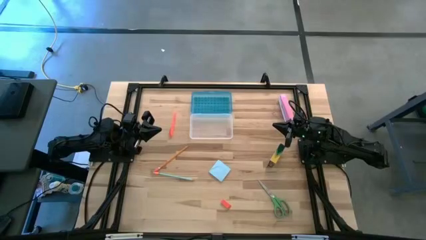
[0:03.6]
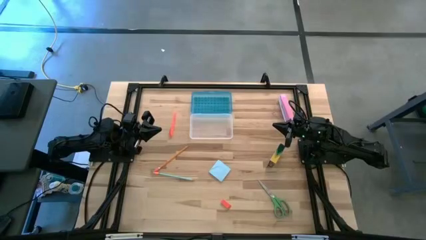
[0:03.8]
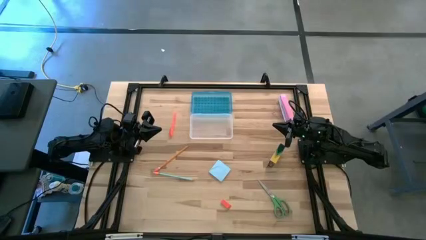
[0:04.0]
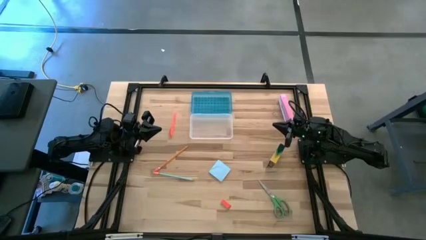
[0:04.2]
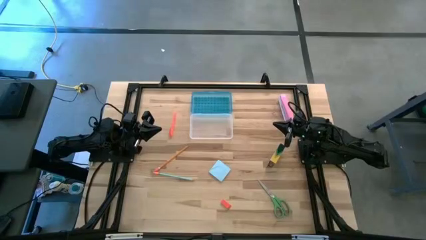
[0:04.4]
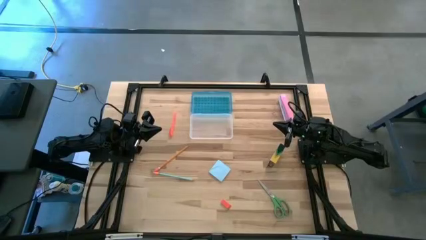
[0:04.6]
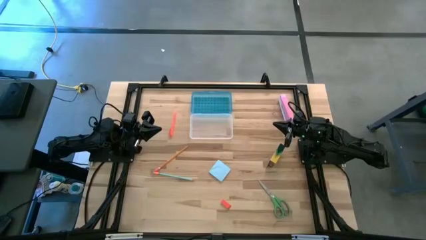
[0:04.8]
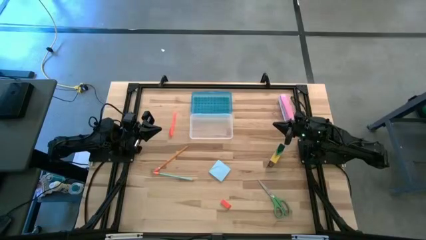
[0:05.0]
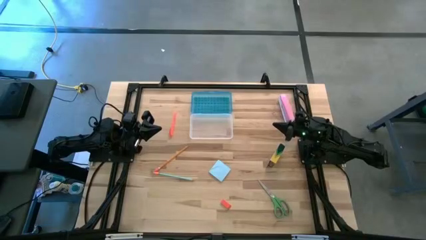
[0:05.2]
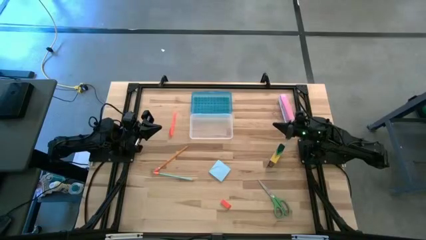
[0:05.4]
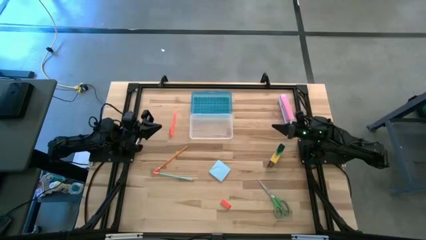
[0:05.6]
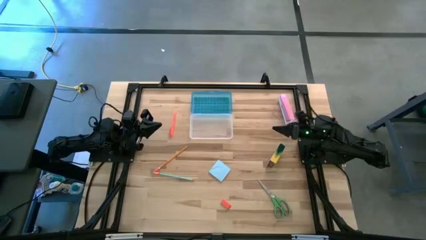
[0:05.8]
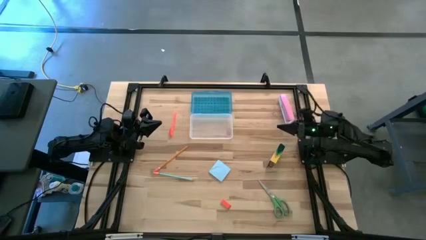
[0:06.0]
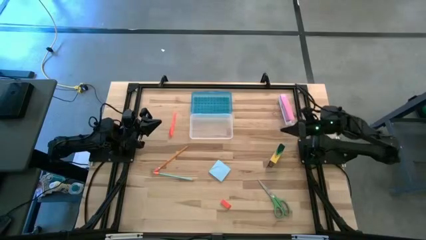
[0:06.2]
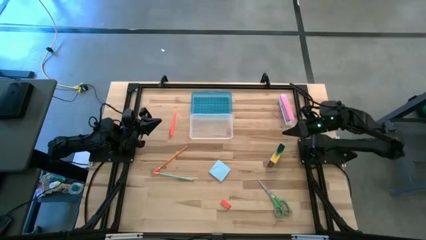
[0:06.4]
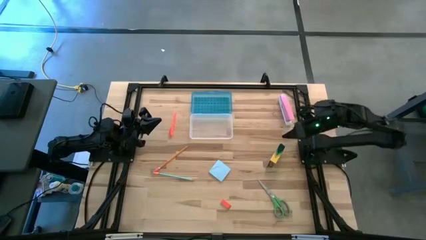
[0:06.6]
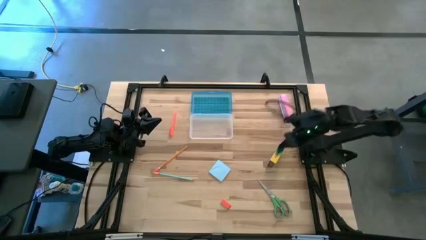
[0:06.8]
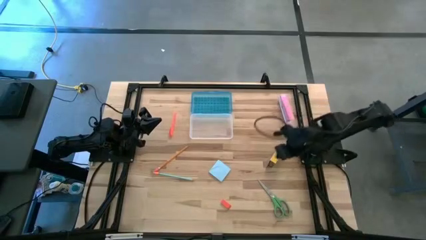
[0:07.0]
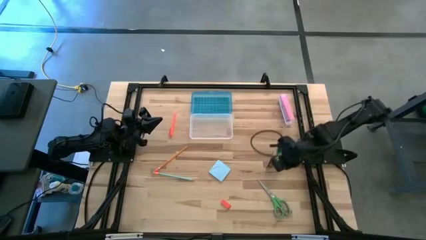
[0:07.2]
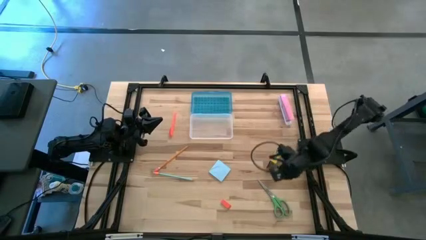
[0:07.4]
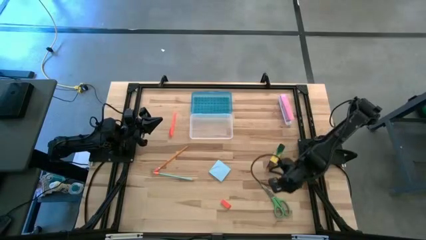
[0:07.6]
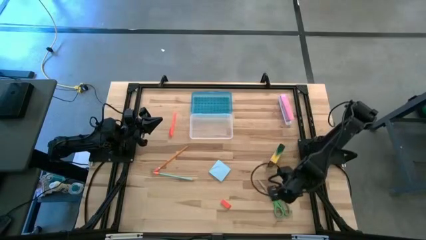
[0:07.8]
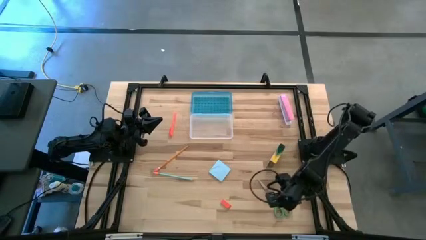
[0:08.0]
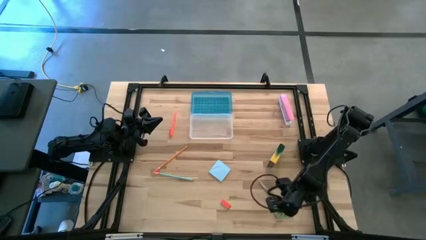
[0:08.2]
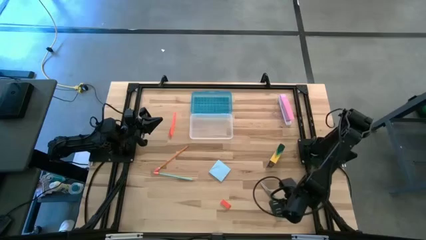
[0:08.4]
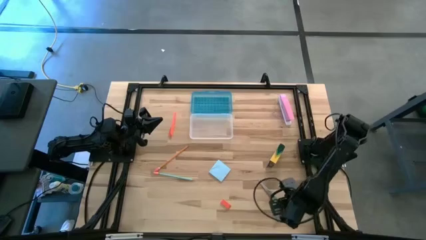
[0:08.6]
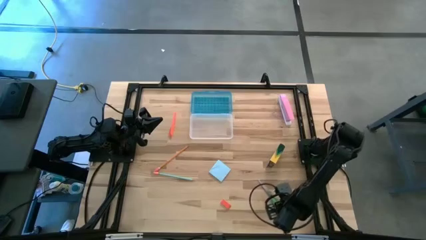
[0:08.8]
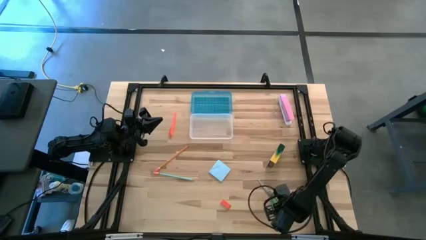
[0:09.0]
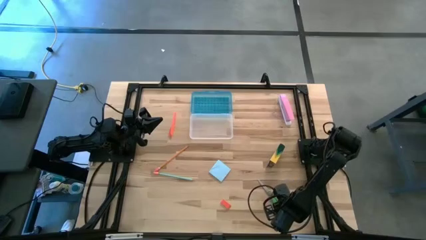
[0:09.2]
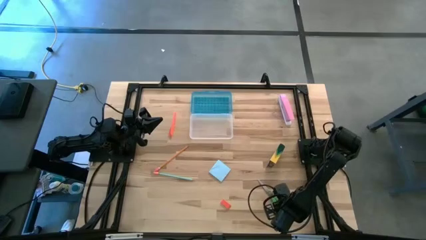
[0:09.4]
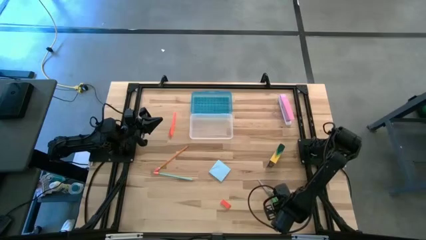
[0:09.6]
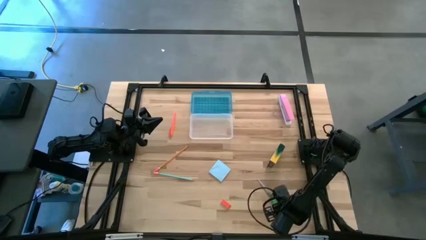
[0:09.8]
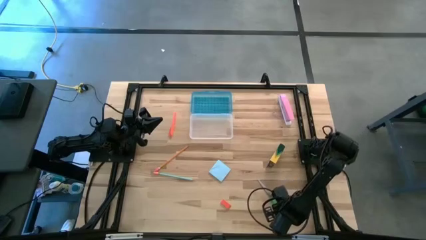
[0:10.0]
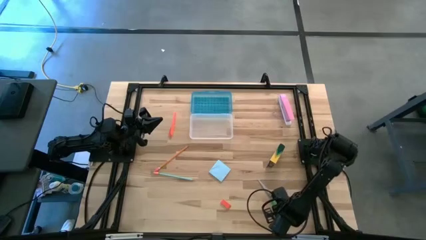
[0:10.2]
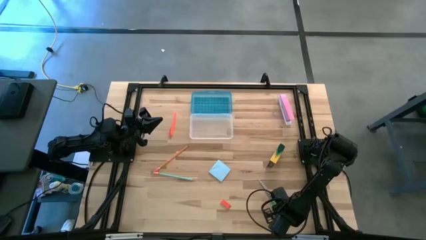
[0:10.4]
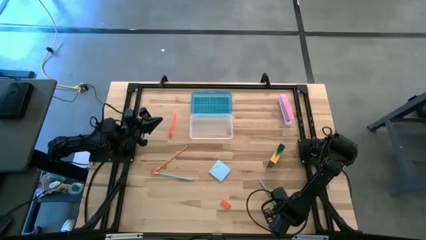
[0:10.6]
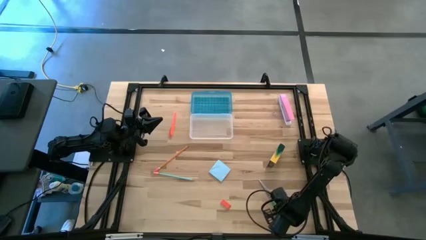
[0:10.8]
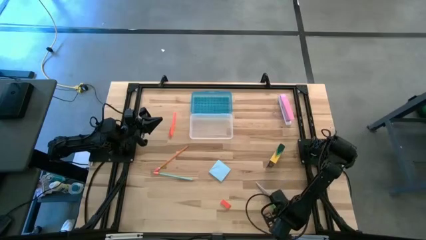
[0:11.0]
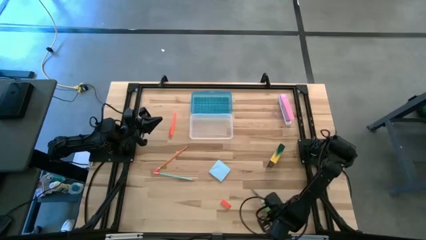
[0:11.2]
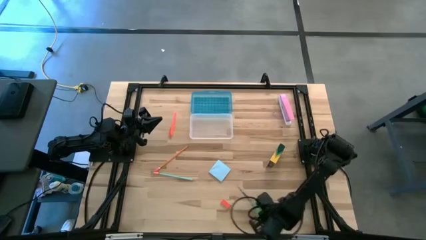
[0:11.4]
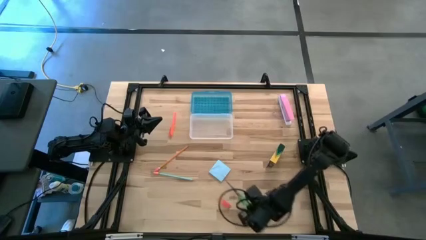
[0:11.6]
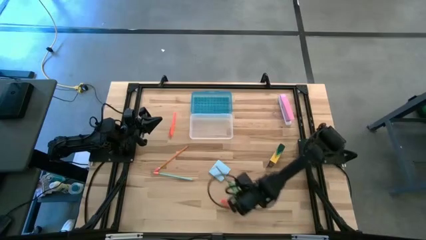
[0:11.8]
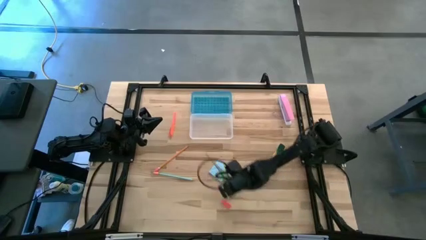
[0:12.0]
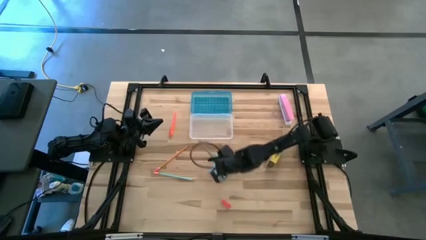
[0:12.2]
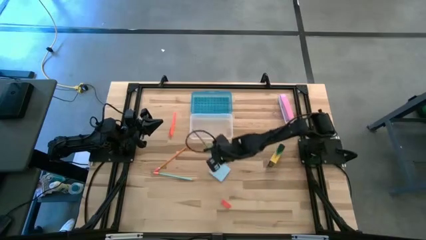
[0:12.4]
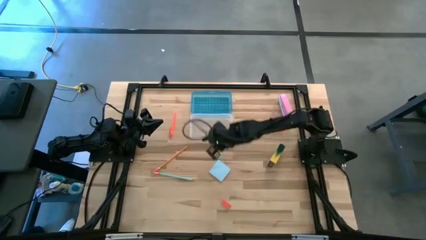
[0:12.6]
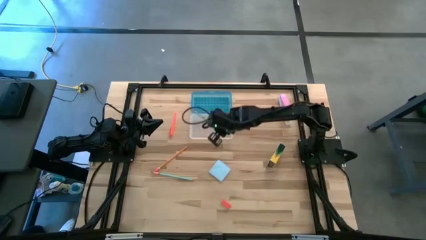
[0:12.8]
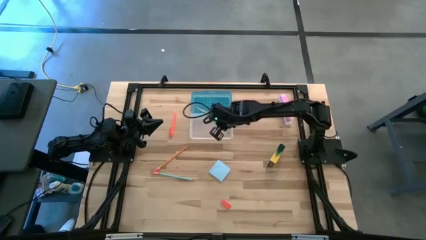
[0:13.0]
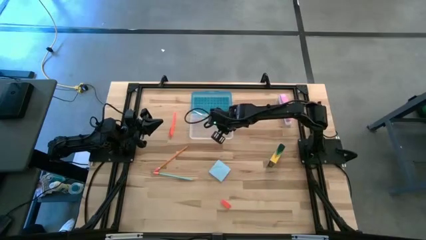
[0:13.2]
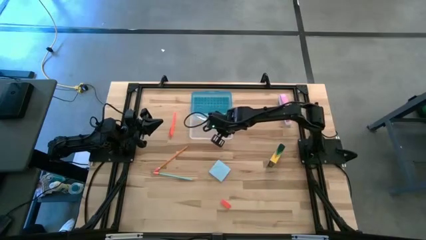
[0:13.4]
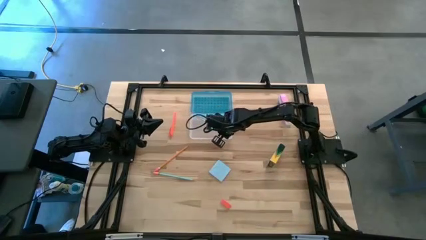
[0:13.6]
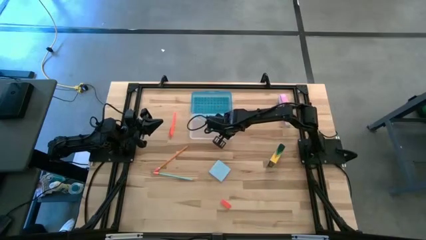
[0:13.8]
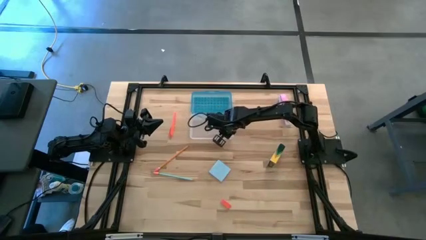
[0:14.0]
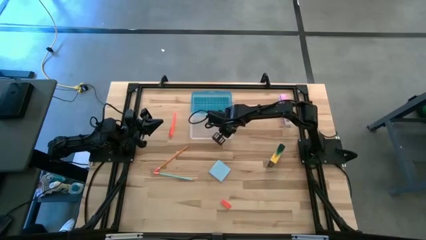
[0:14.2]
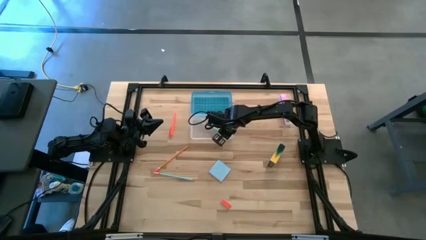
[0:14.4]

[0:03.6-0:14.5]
Task: Pack school essentials
Put the green scissor into the blue supply box

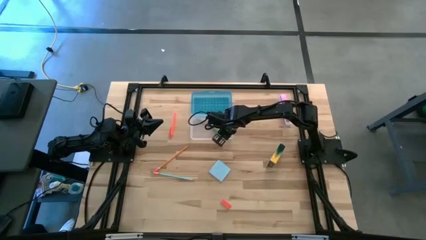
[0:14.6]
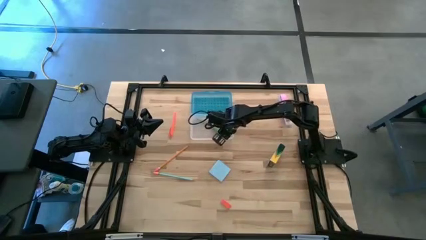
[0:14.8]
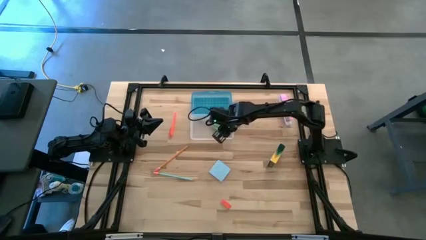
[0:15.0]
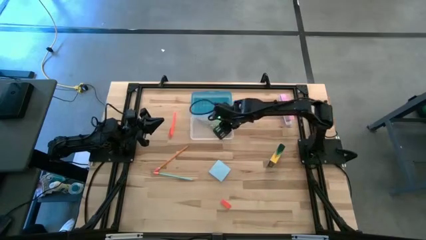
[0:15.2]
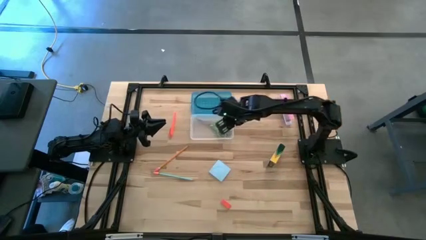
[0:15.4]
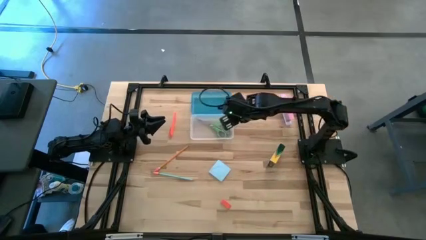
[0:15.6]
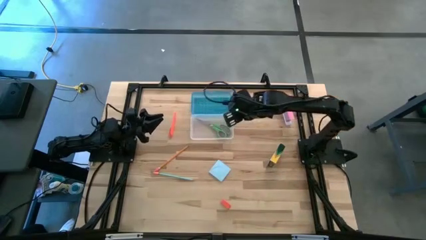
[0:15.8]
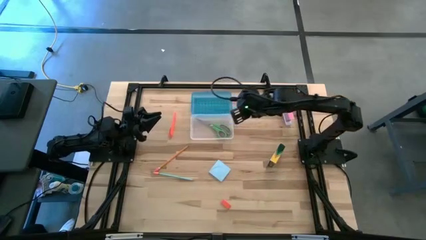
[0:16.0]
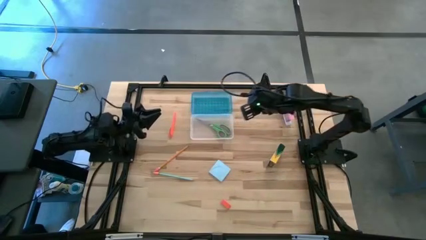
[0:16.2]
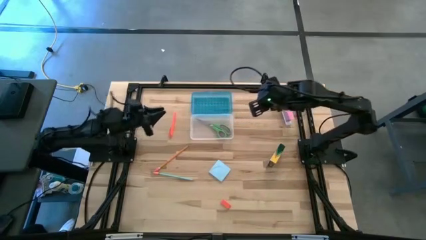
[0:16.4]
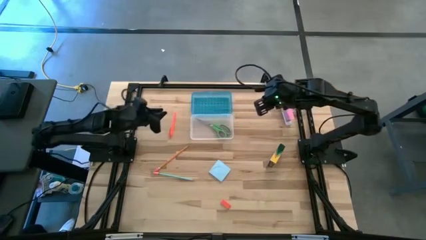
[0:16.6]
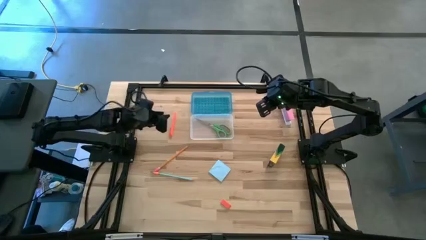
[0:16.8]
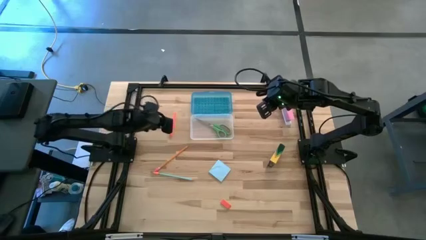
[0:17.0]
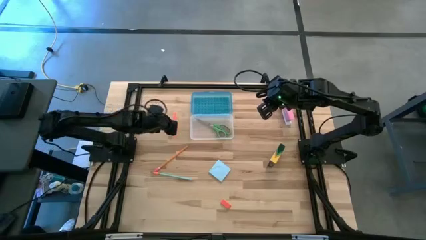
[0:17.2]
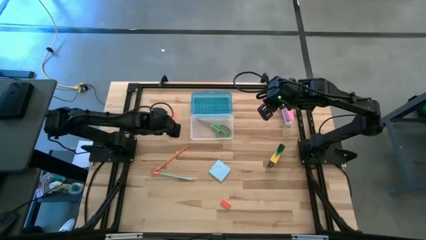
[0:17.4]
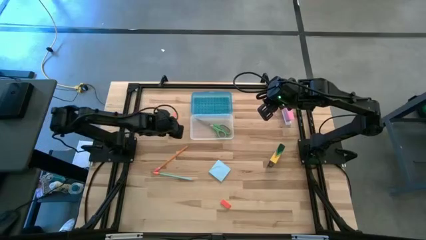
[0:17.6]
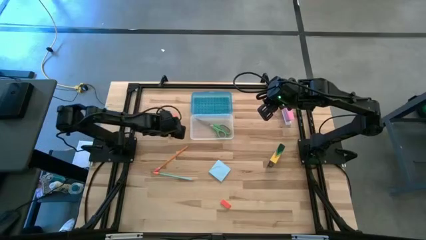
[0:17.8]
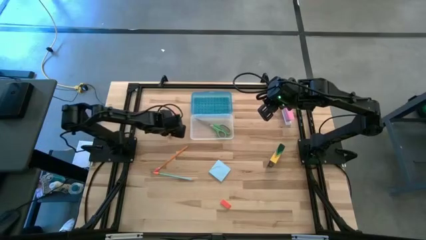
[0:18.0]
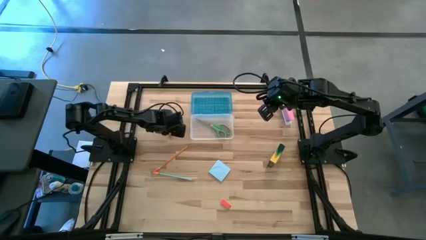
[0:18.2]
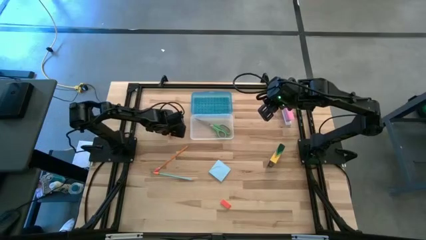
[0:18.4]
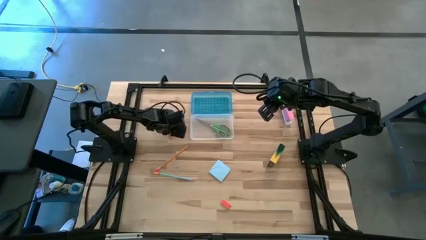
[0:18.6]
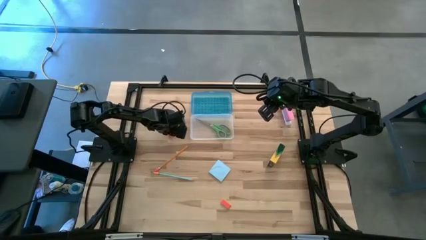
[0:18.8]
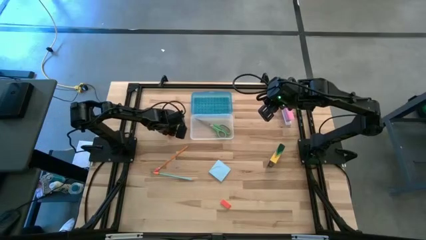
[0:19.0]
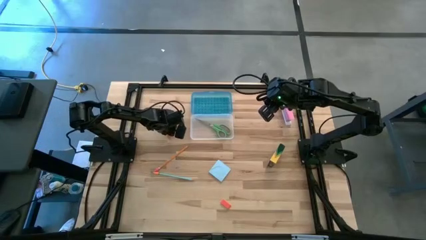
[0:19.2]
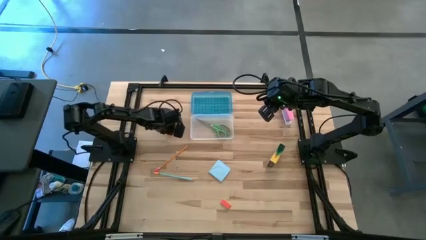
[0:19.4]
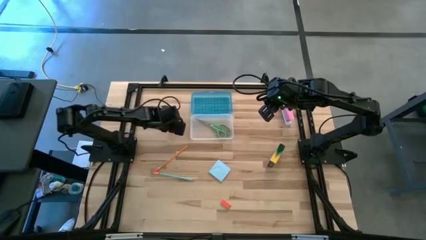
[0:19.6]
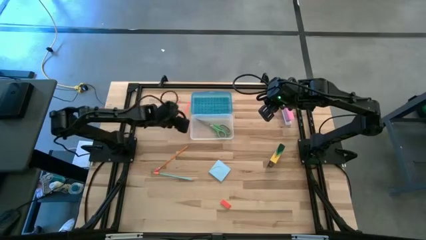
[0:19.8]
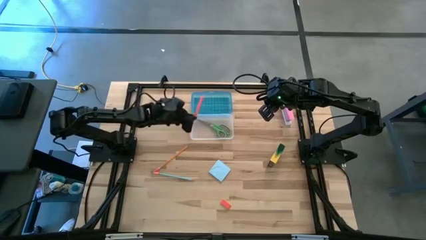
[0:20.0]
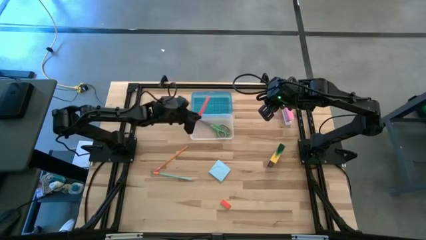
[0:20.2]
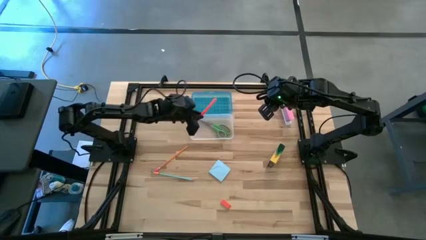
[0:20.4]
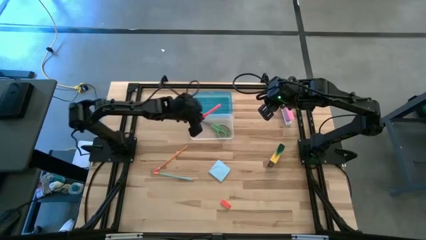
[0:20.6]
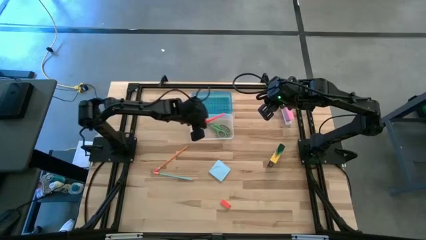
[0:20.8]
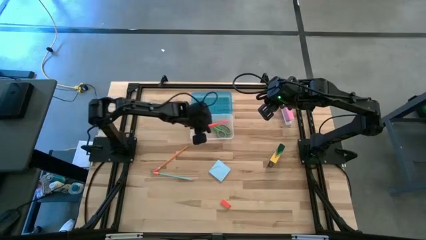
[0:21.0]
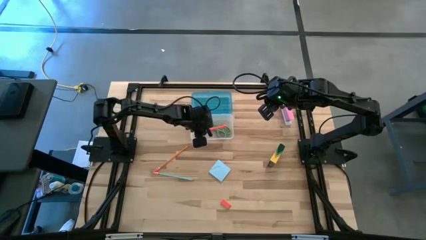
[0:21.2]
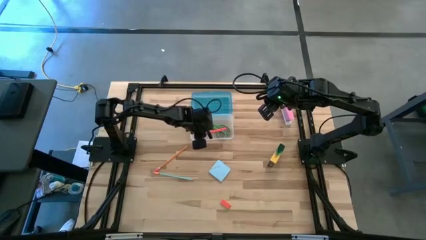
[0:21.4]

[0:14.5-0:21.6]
Put the orange pen into the blue supply box
